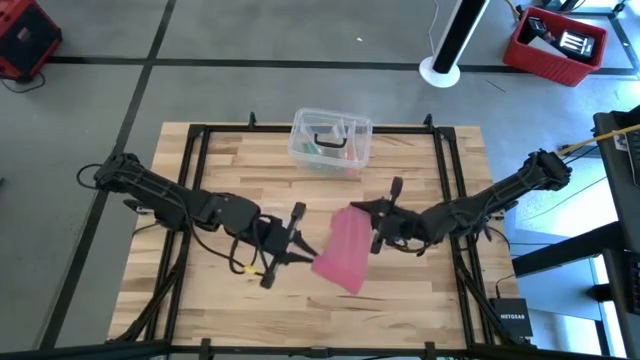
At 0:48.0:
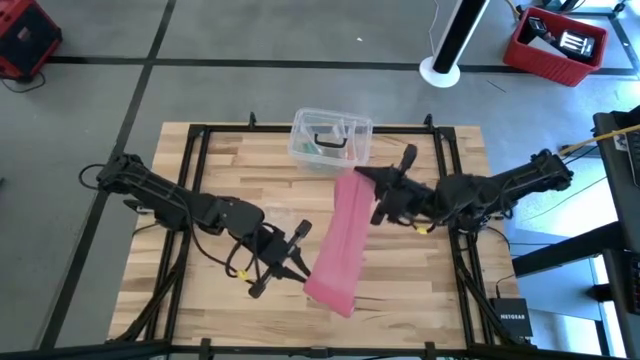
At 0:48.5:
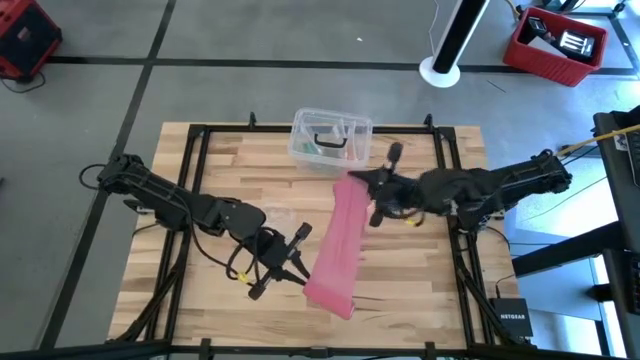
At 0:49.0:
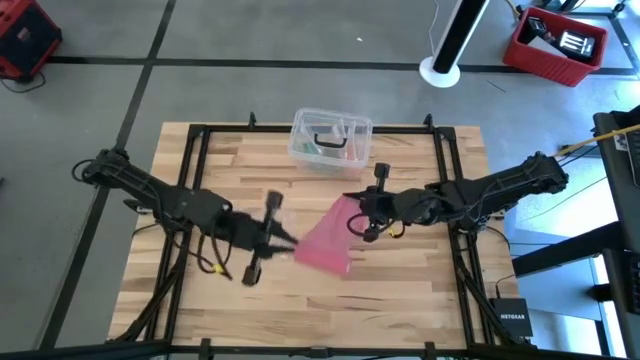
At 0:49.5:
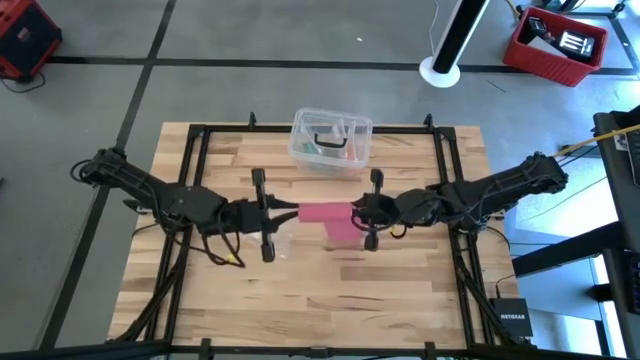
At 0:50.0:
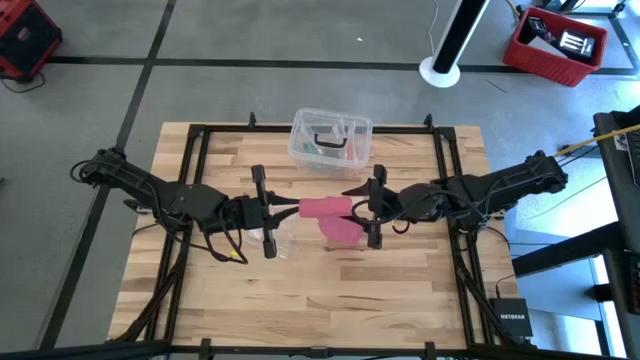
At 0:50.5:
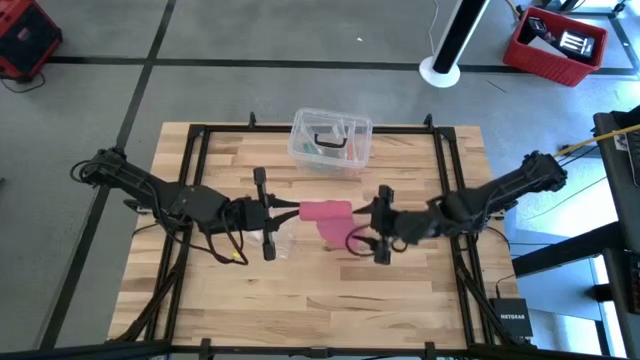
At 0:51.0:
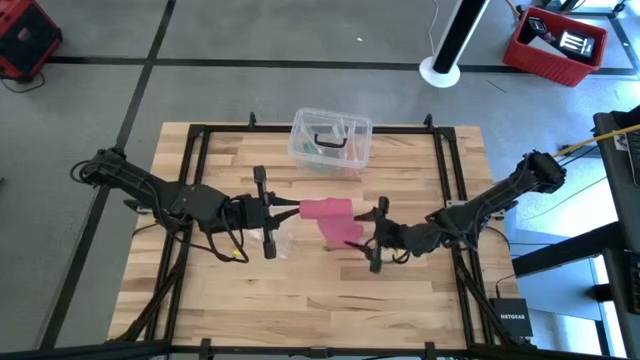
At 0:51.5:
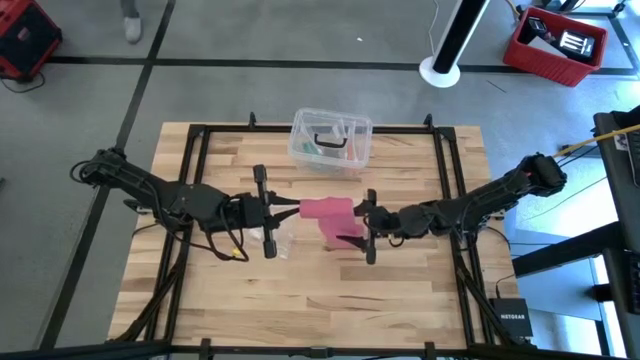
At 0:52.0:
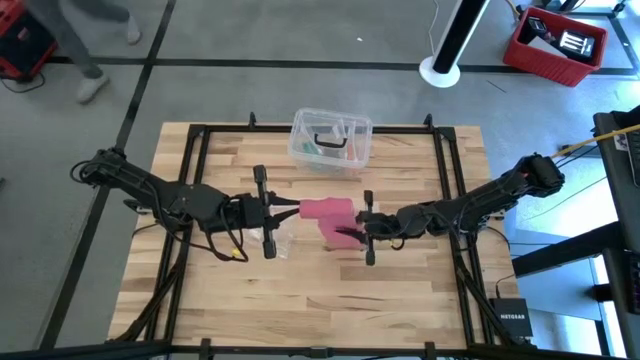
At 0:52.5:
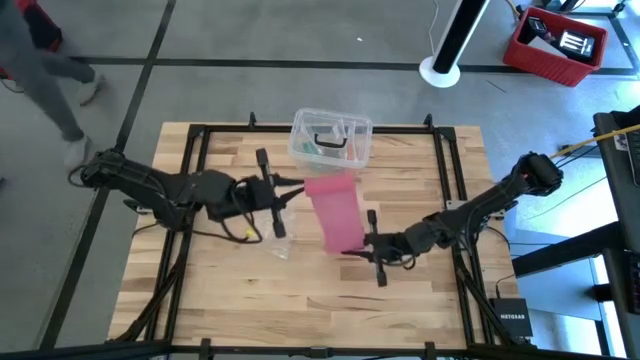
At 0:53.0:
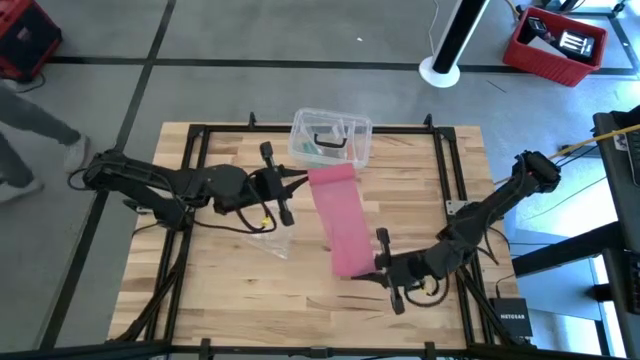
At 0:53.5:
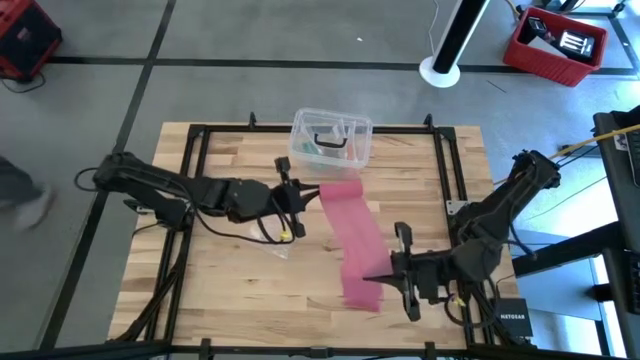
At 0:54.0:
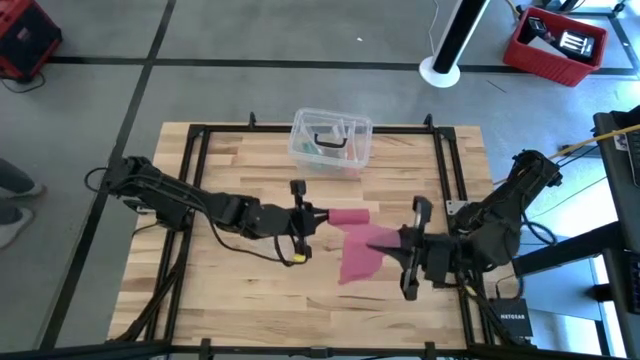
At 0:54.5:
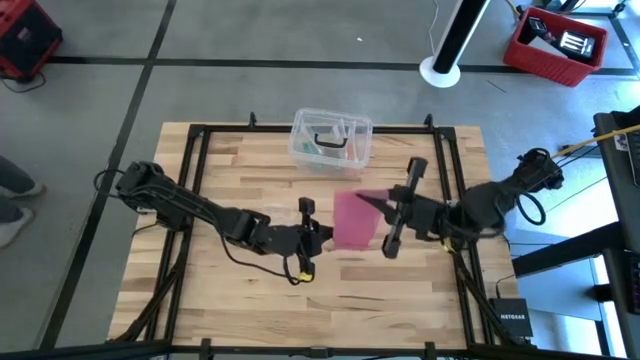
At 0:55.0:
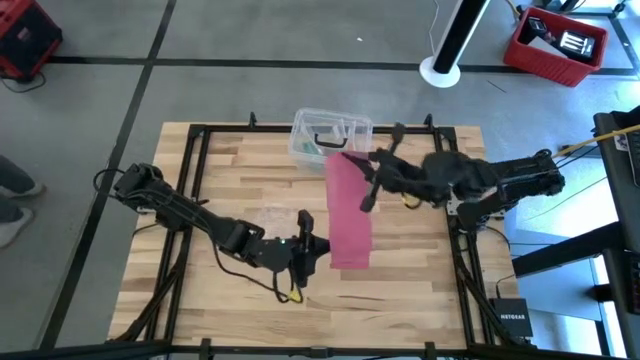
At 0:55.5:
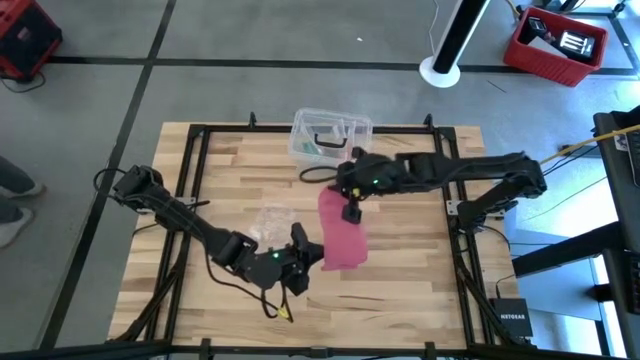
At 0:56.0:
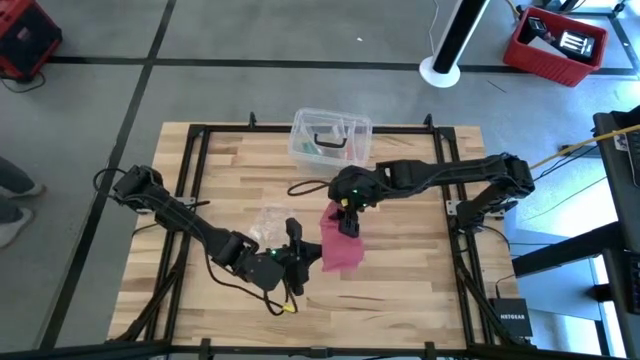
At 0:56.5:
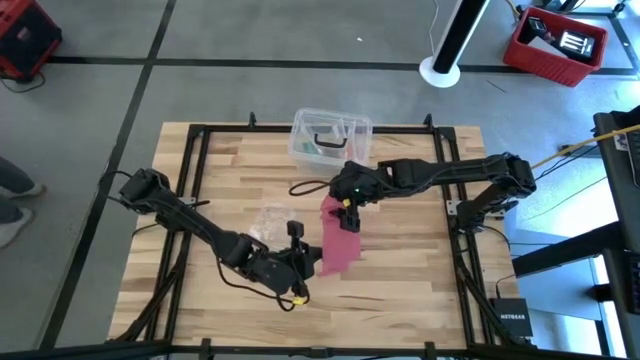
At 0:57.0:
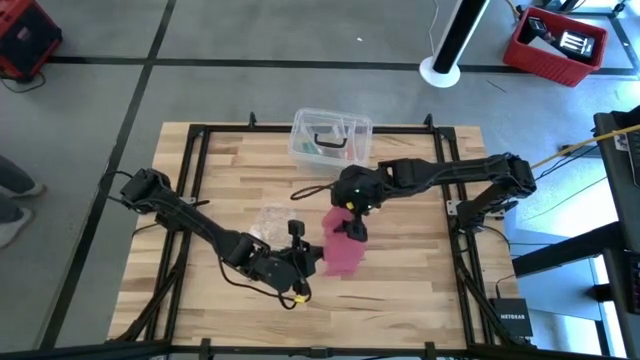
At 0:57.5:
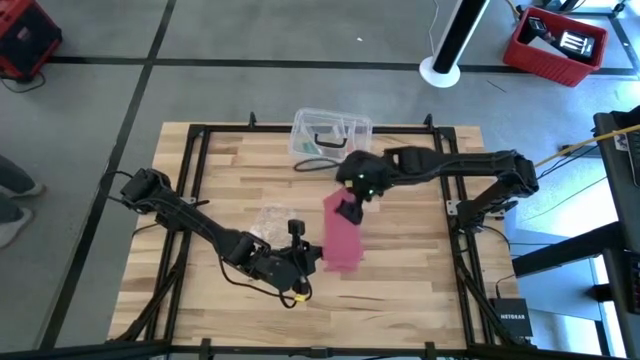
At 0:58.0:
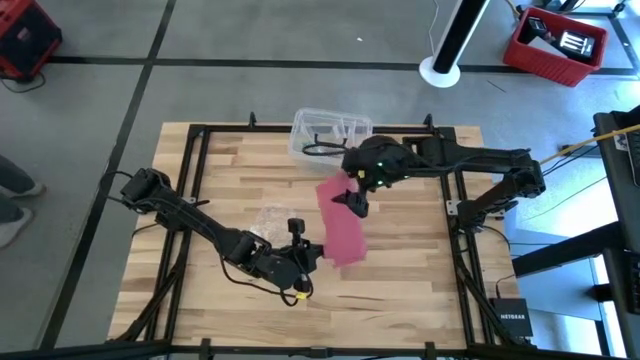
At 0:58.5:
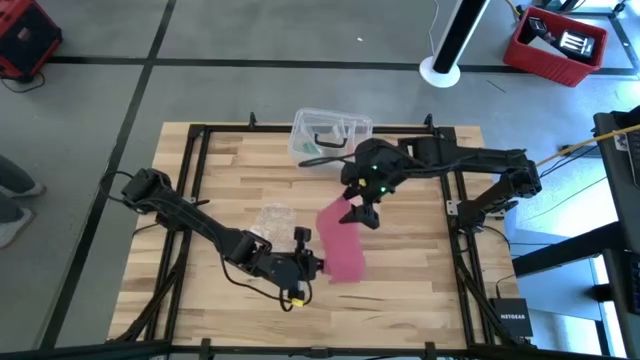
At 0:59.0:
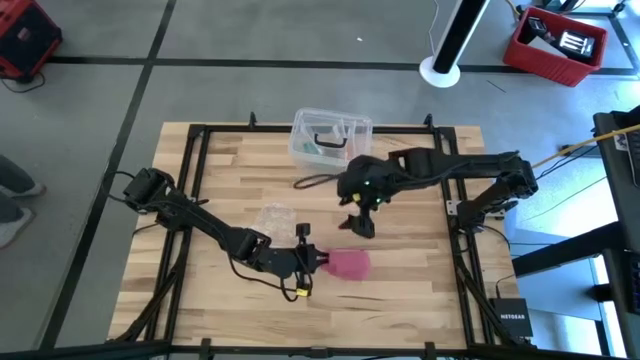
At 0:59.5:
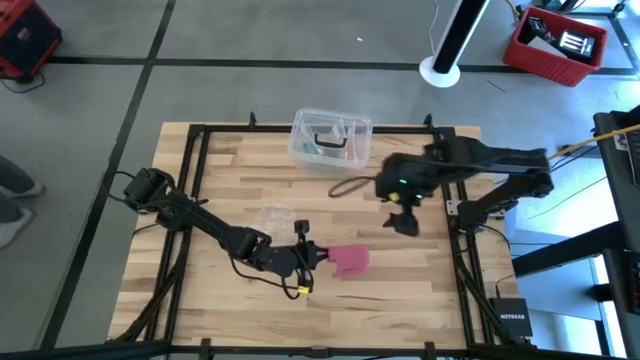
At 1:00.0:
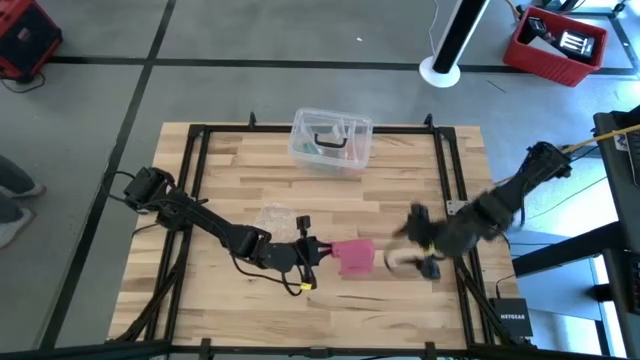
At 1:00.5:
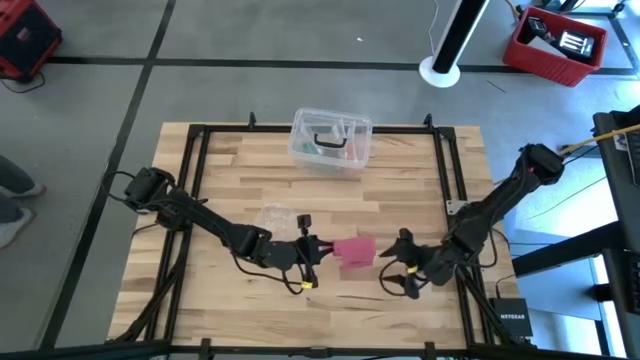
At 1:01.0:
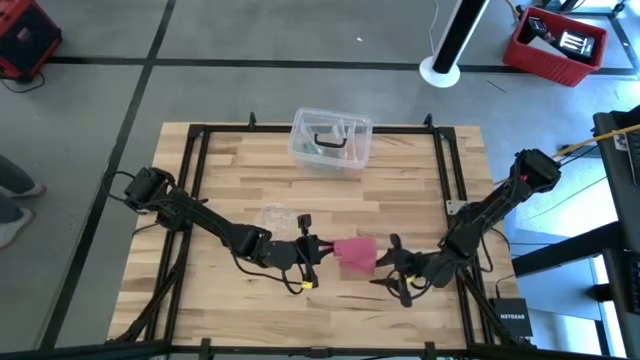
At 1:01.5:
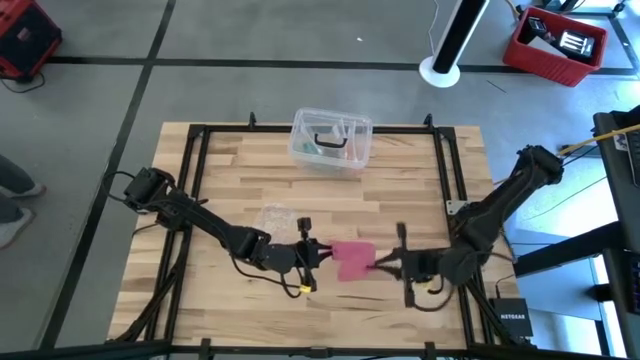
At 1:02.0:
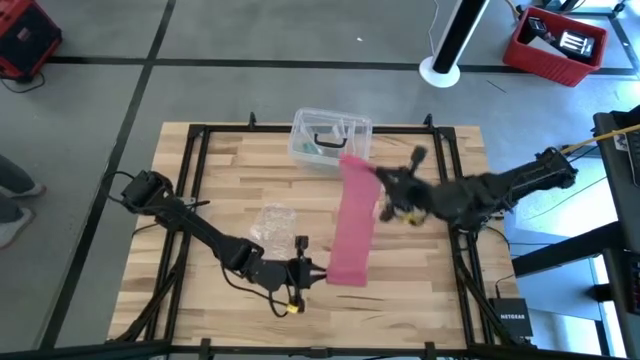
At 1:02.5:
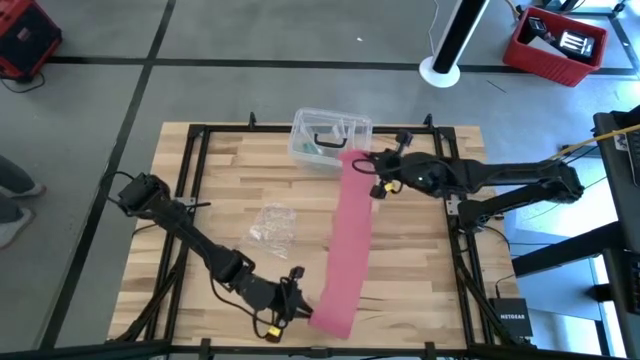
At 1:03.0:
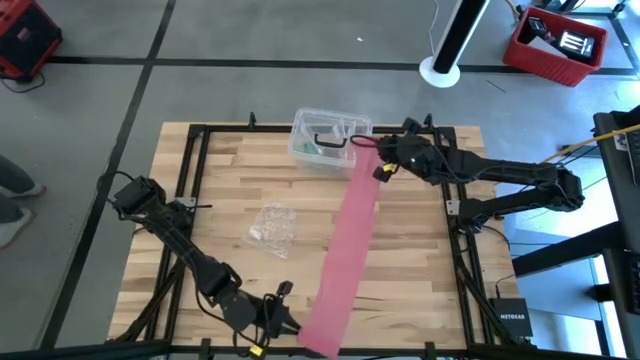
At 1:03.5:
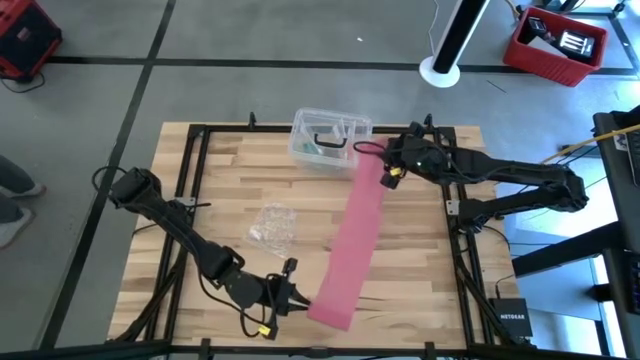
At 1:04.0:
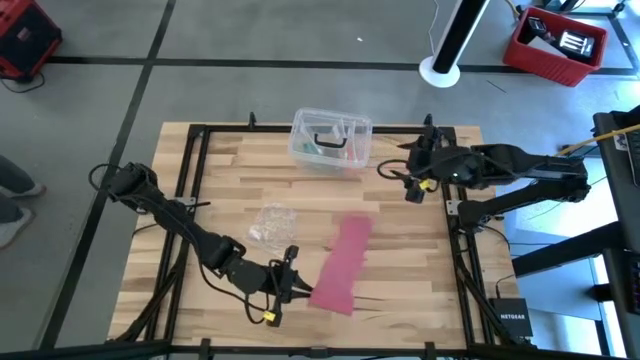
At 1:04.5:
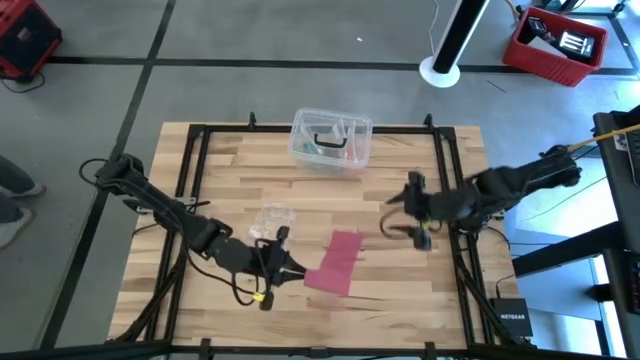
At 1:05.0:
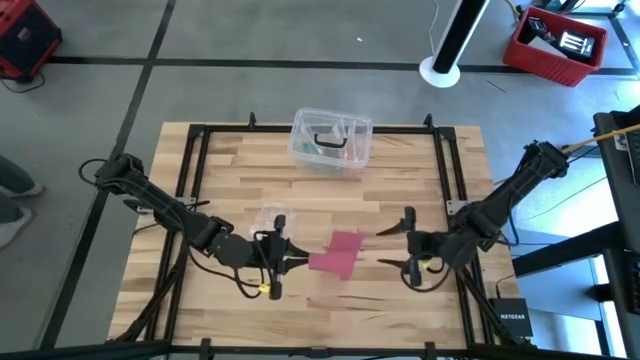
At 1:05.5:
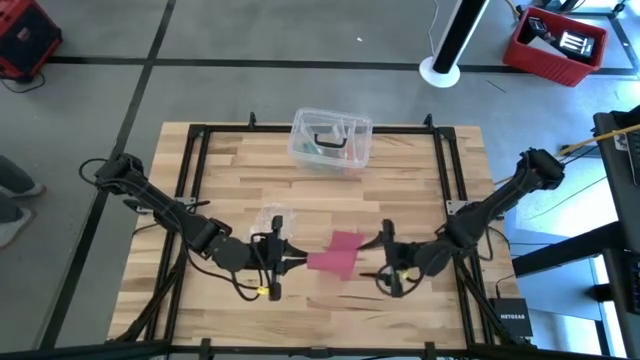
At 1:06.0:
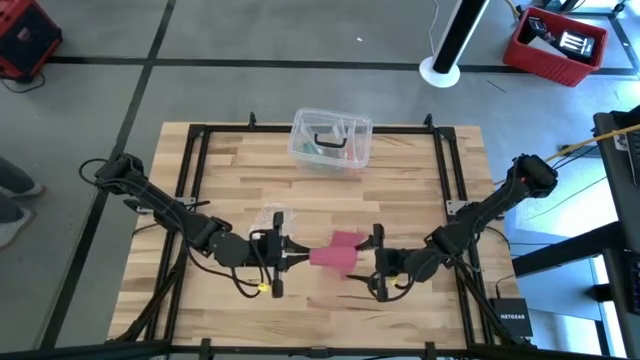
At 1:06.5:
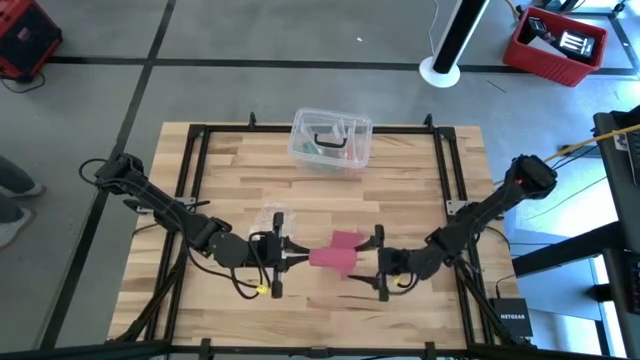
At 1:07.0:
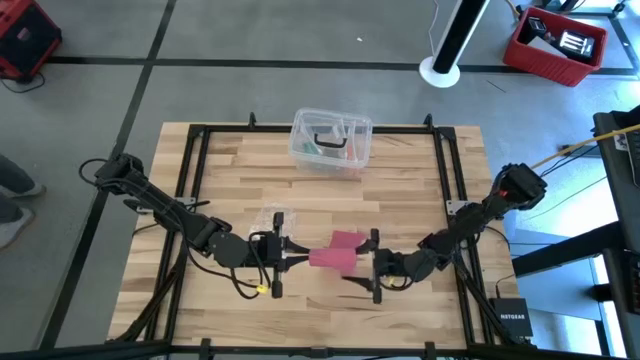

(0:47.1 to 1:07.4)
Task: Roll bandage
Roll the pink bandage

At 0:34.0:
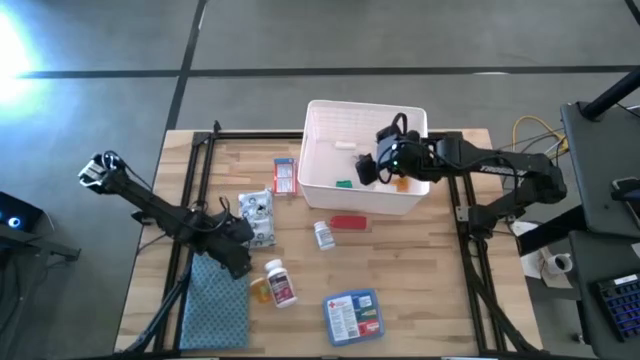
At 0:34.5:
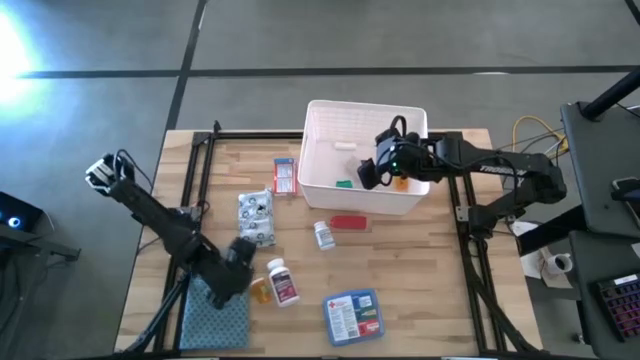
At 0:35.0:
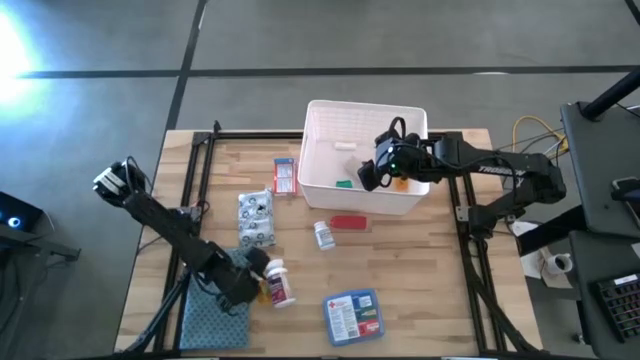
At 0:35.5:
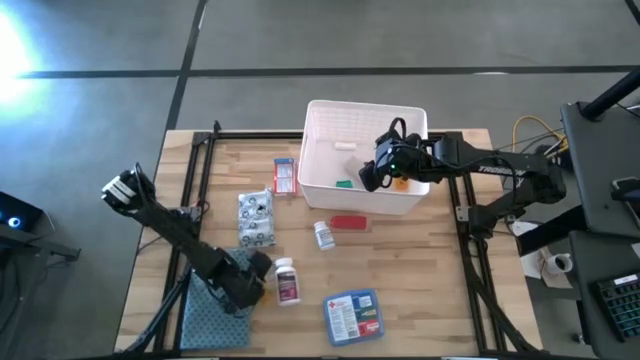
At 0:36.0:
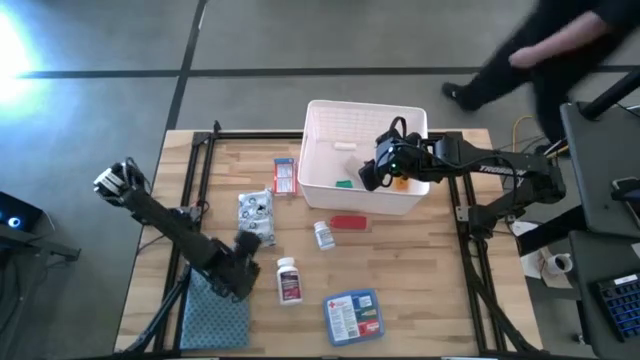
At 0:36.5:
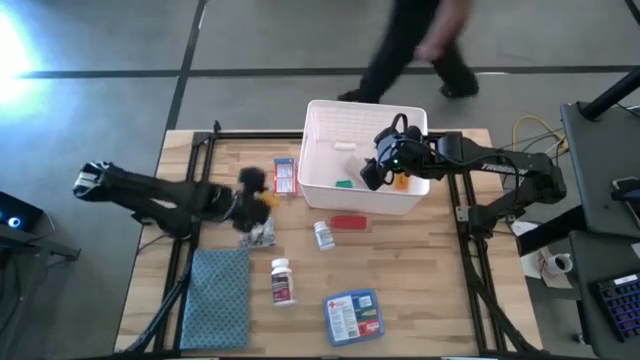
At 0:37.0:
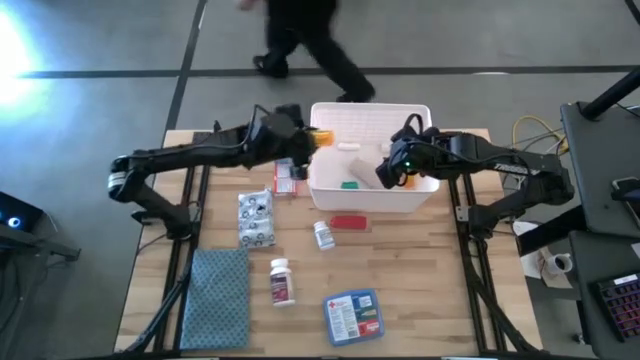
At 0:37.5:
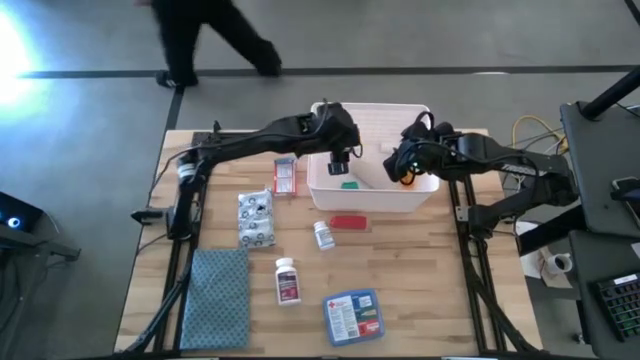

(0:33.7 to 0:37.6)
Task: Pick & place medical supplies in basket/bin
Put the orange medicine bottle into the bin
